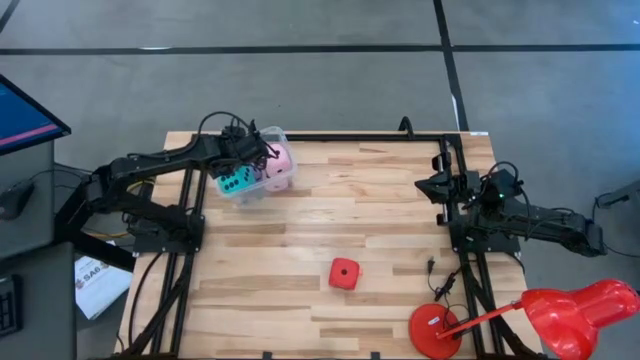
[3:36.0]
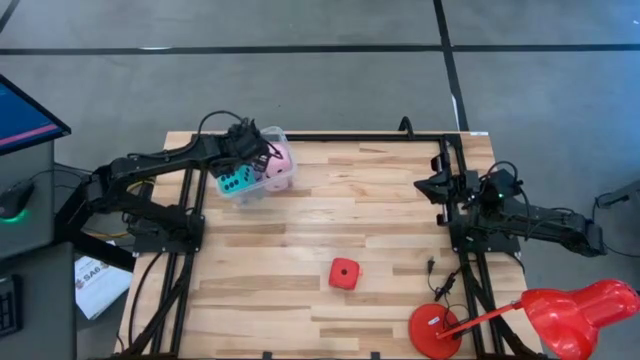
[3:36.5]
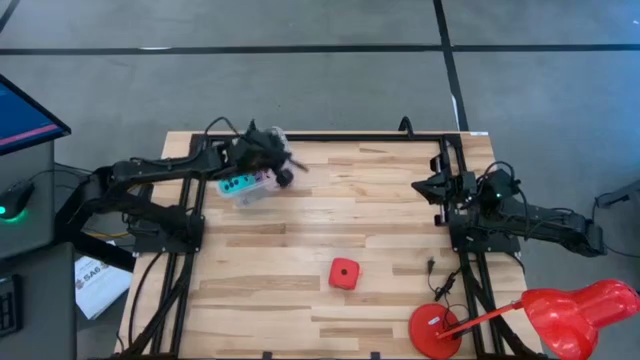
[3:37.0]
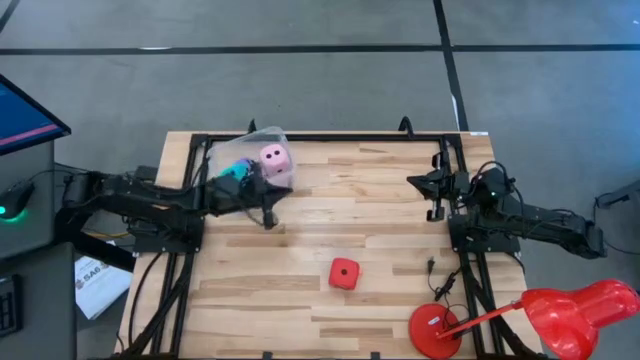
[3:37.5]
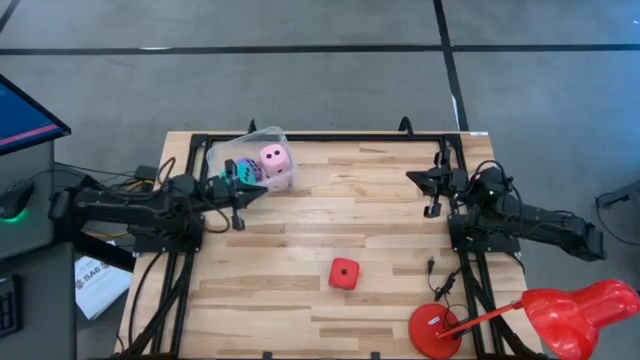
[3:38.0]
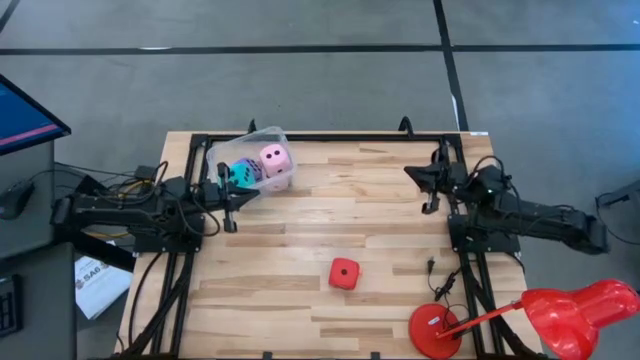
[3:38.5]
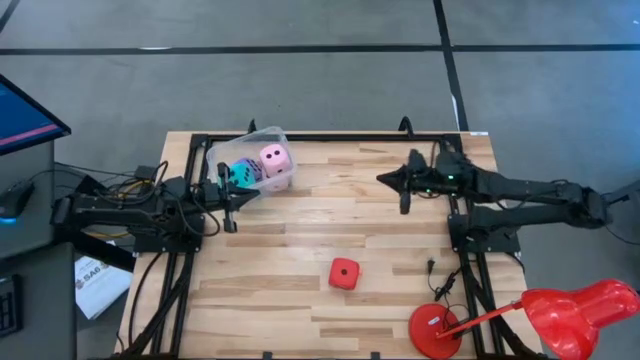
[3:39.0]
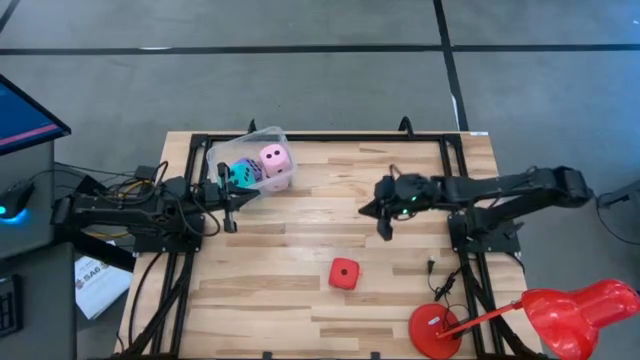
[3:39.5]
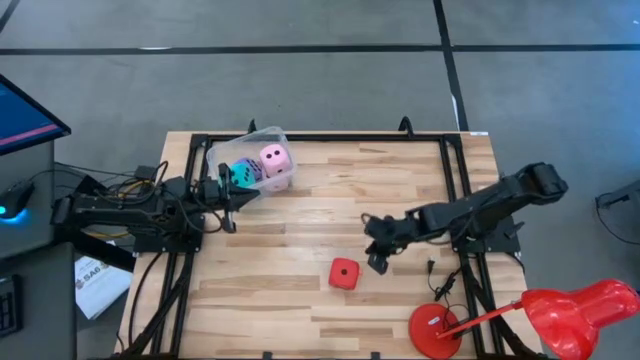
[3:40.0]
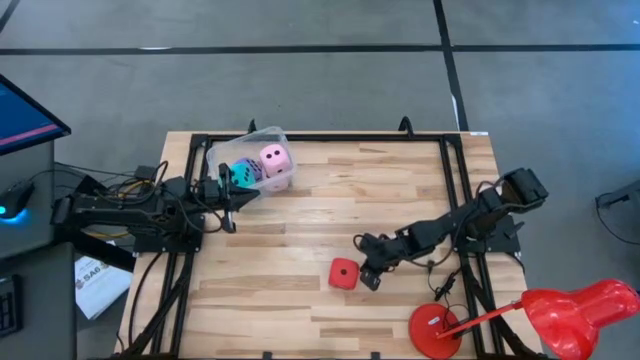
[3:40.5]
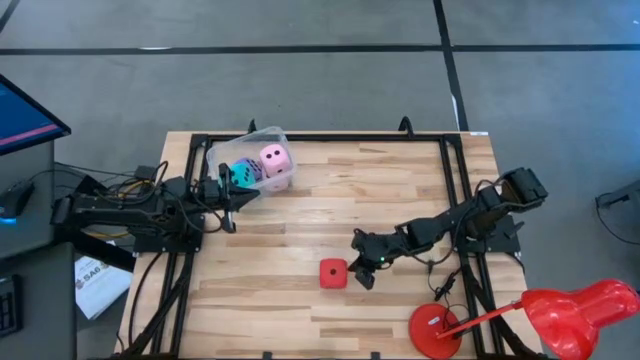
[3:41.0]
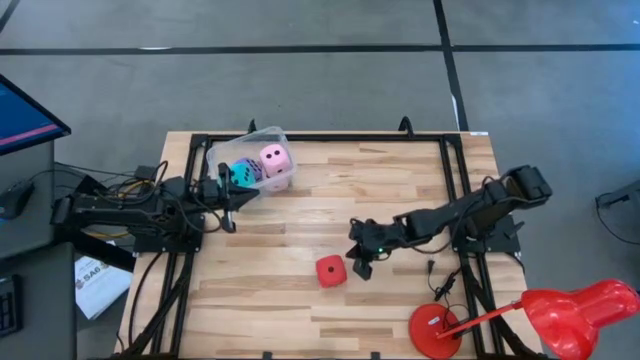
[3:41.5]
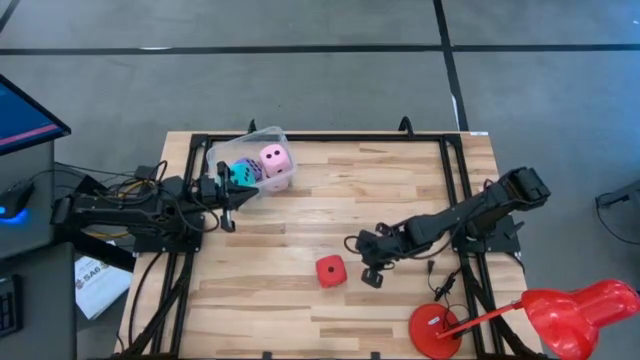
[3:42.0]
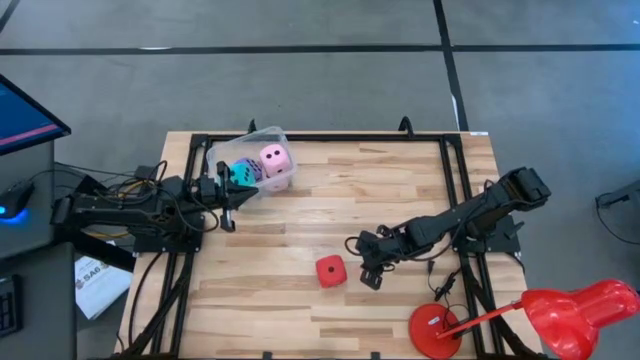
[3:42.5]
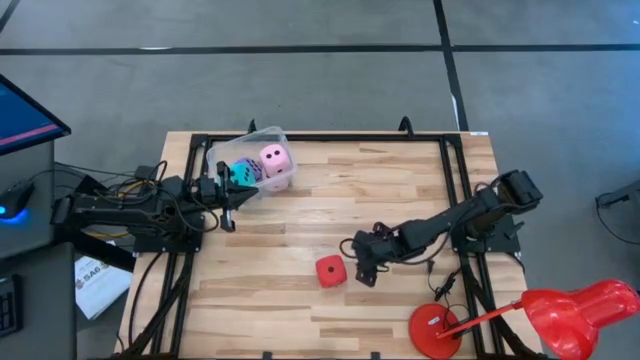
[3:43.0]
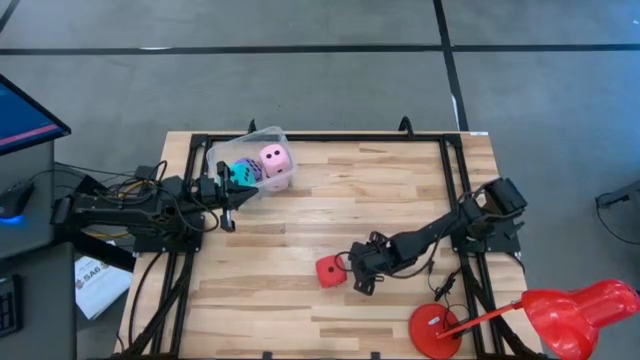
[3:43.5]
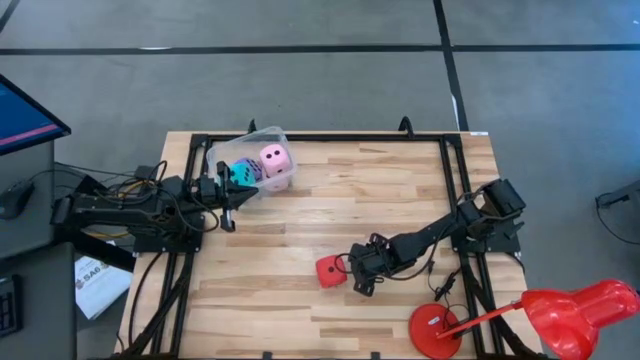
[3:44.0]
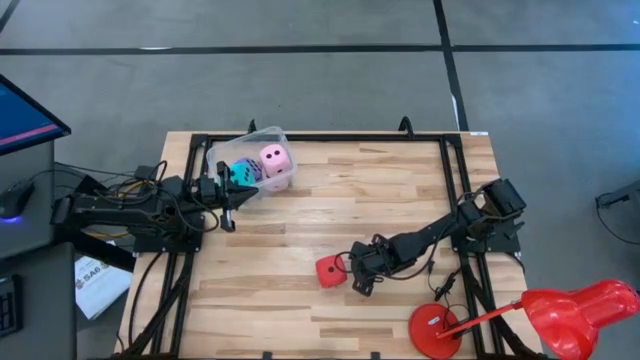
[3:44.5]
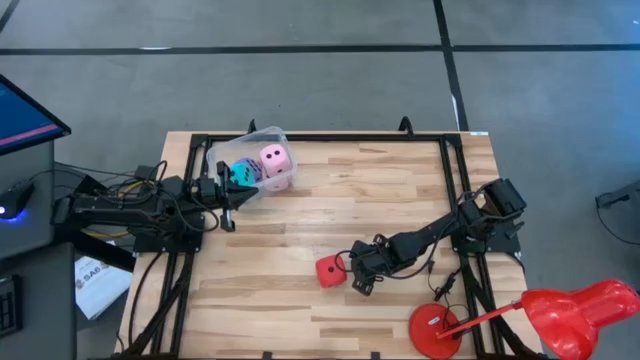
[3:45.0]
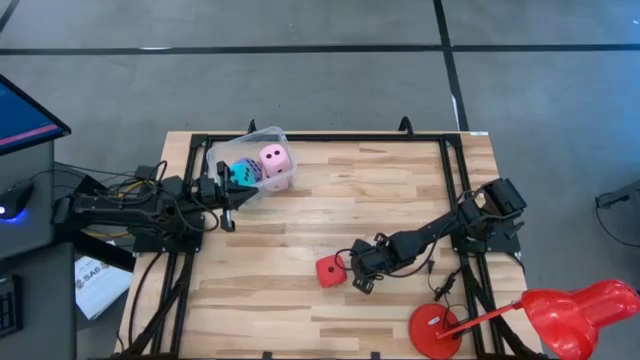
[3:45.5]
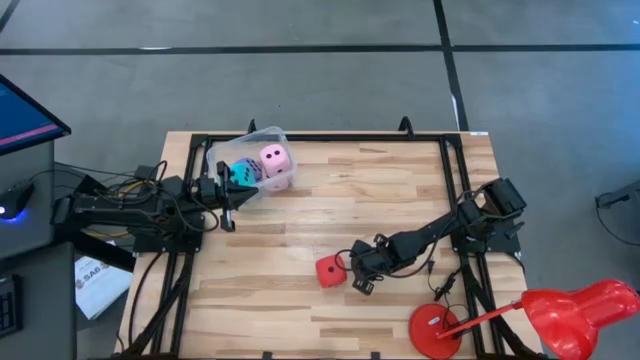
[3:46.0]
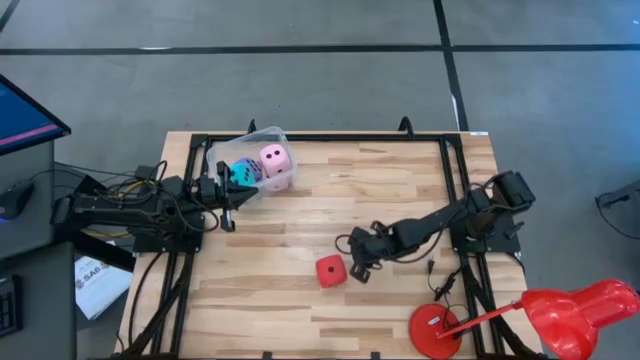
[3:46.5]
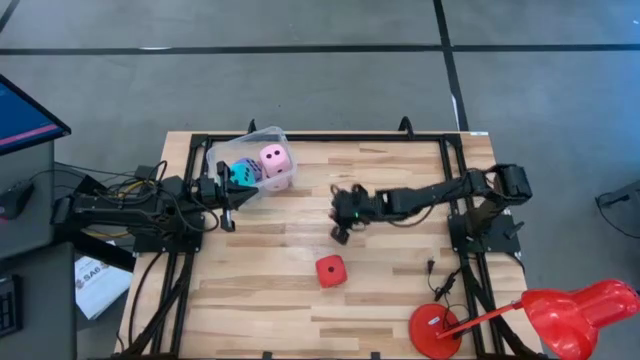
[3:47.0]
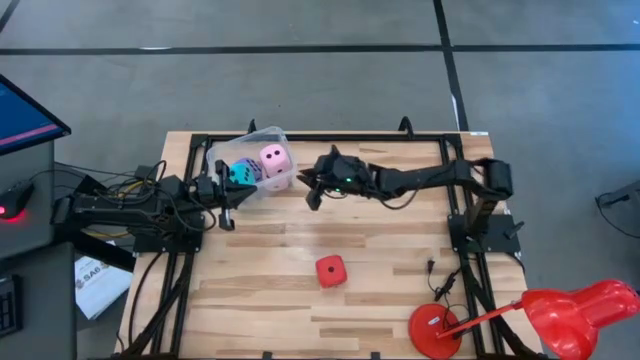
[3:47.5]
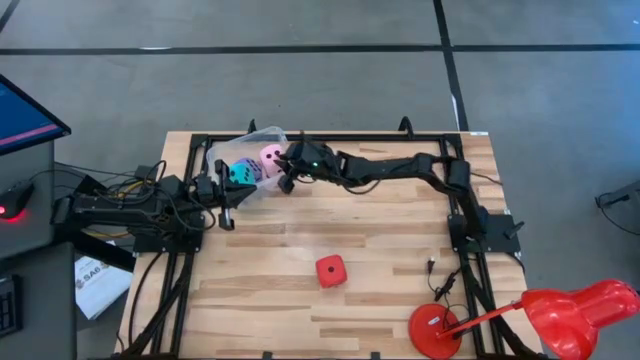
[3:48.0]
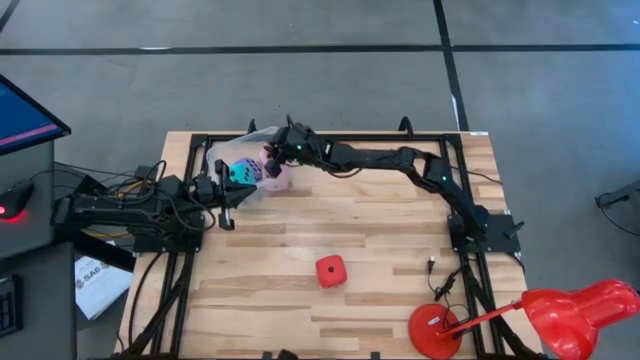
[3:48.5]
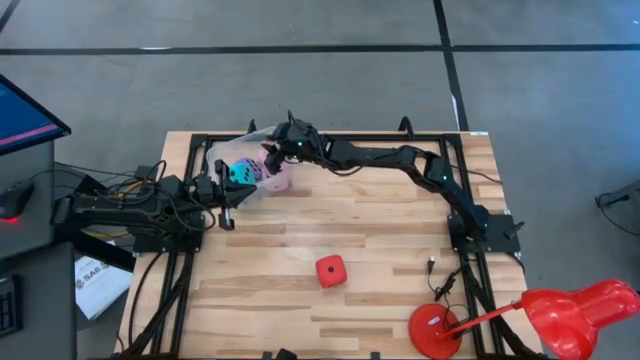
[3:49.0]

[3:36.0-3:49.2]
Task: Pick & Place Dice
Put the small orange dice into the transparent container

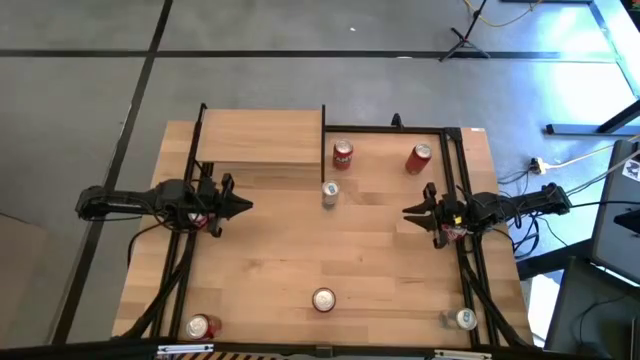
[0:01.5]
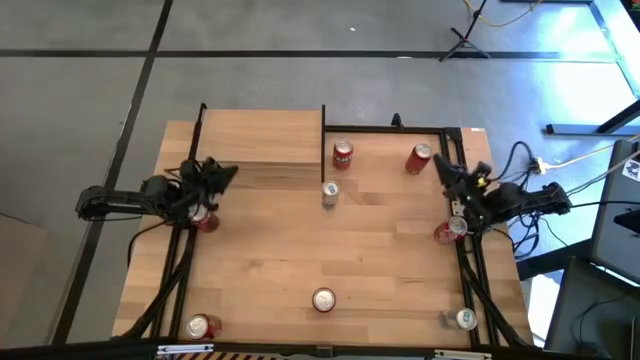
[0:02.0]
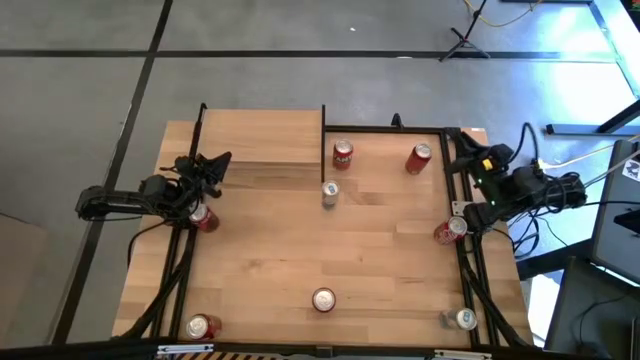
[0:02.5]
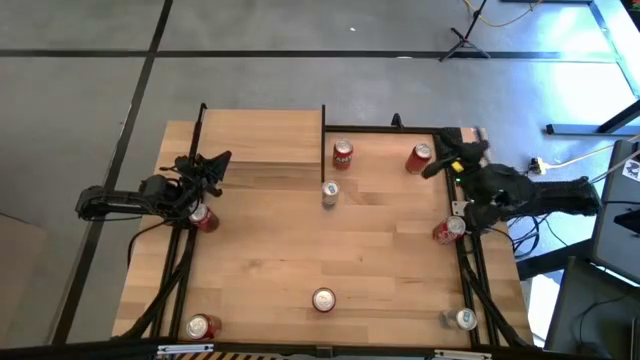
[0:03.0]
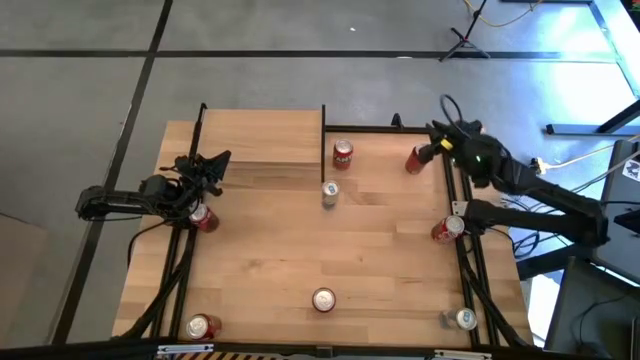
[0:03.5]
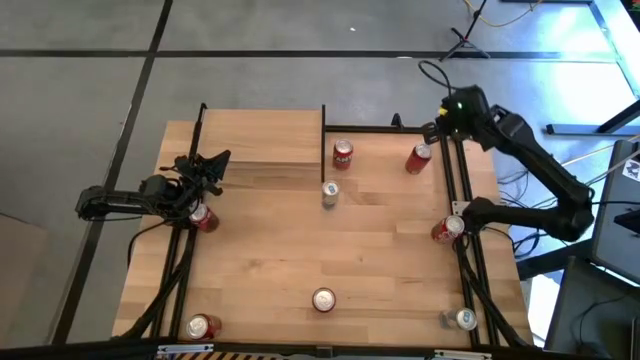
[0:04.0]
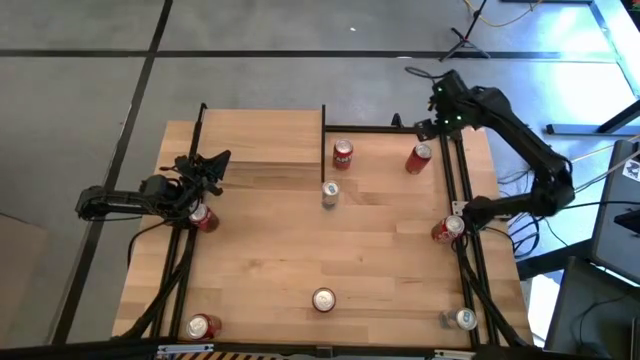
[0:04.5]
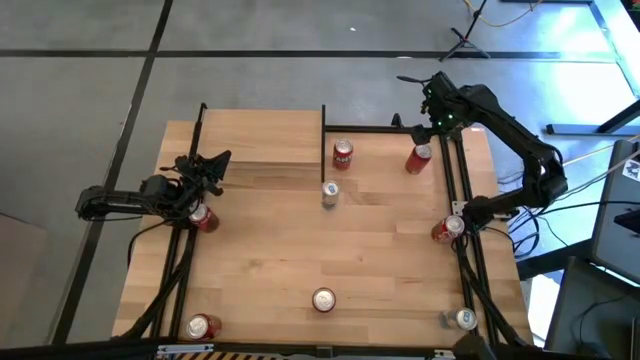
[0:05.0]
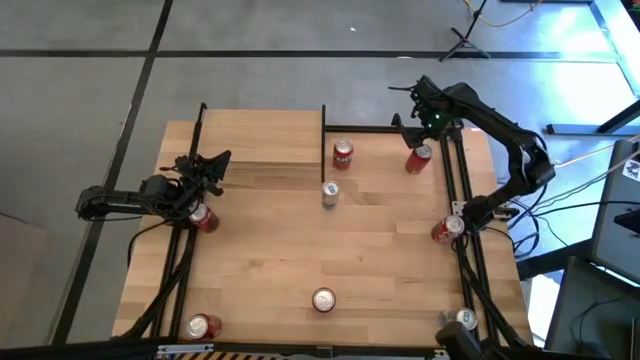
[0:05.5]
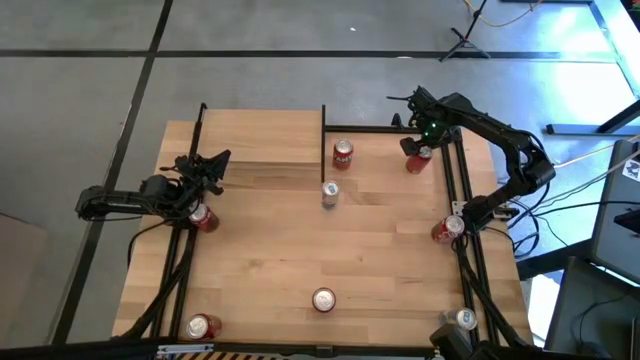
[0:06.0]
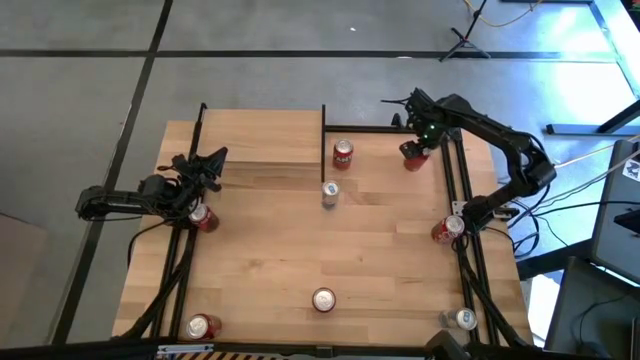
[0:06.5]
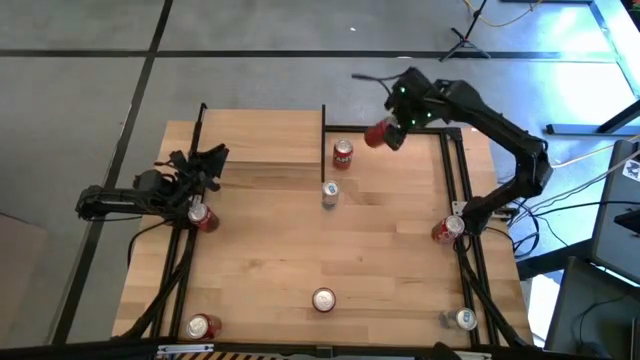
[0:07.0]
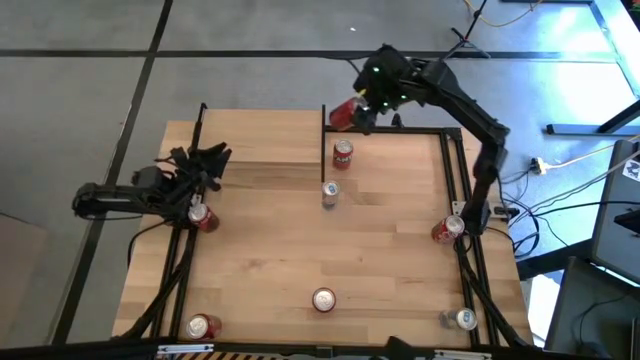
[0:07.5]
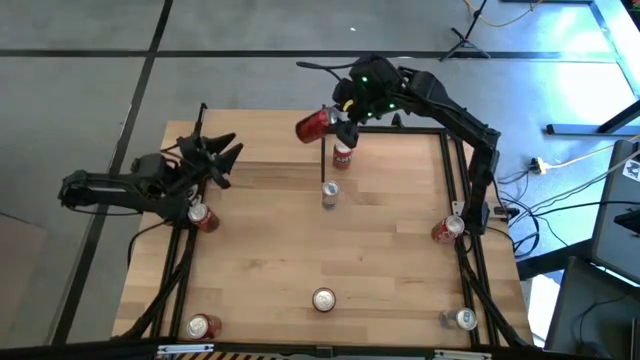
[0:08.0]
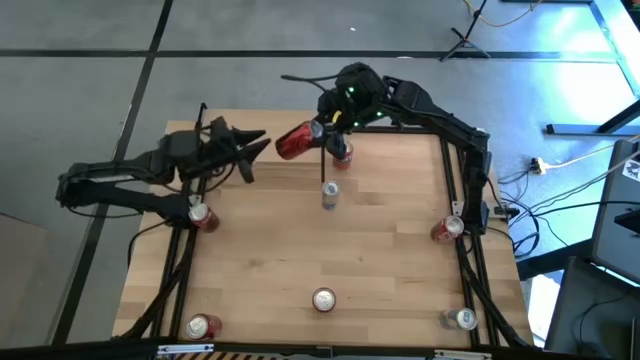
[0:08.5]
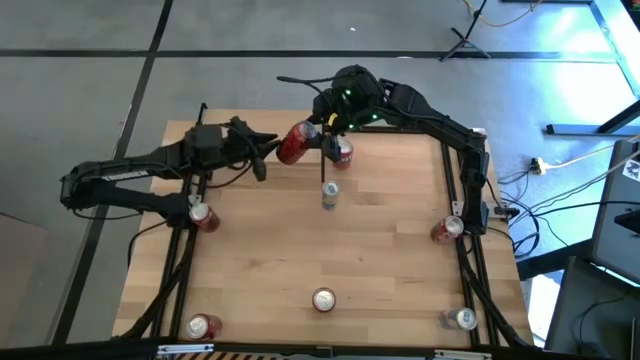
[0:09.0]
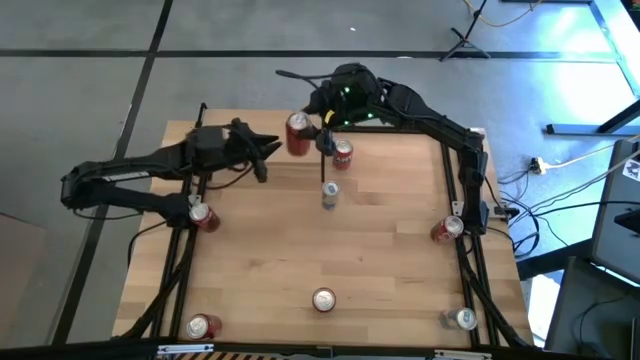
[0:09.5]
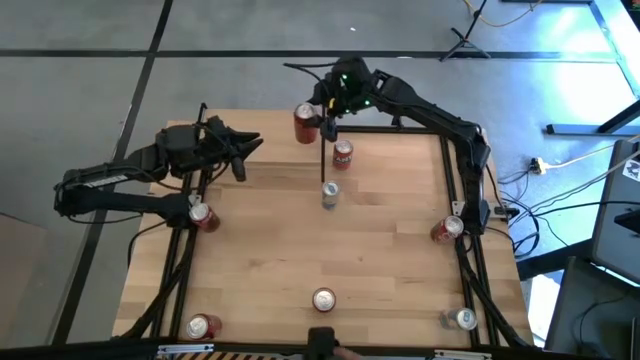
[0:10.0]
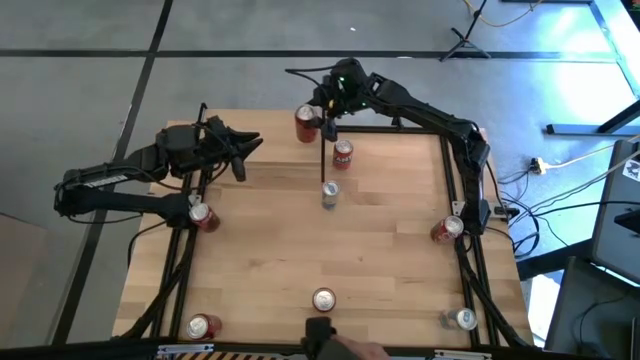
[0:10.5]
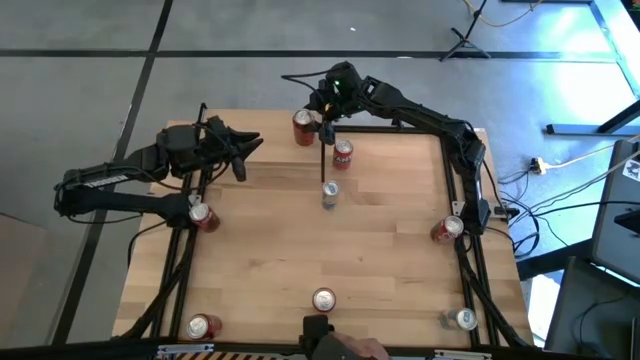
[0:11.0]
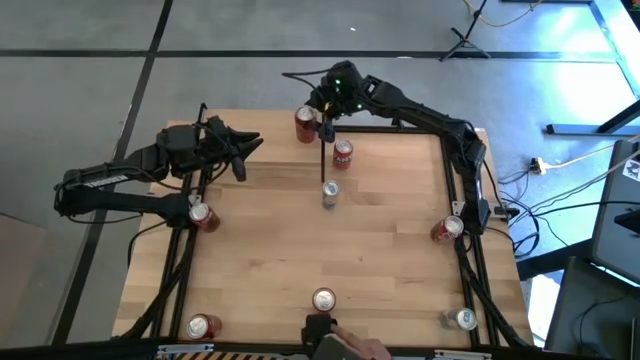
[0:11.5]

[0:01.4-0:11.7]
Task: Place canned beverage on shelf
Put the top red black soda can on the shelf
